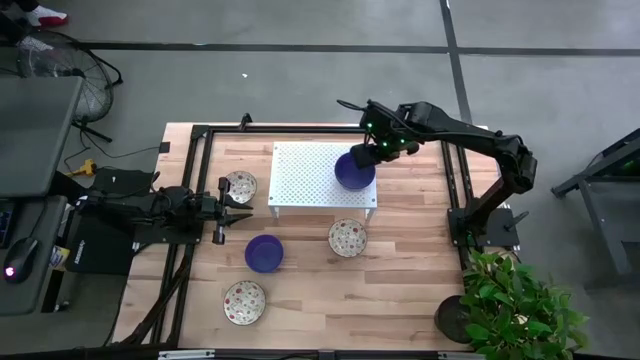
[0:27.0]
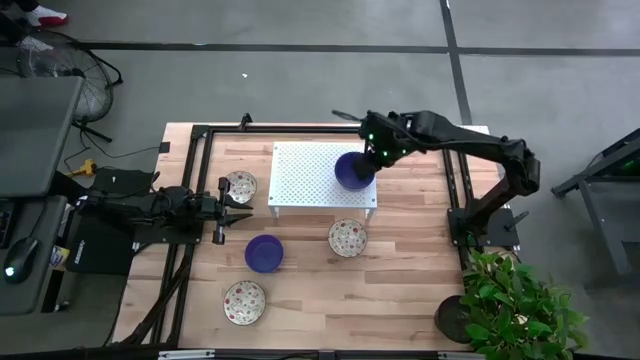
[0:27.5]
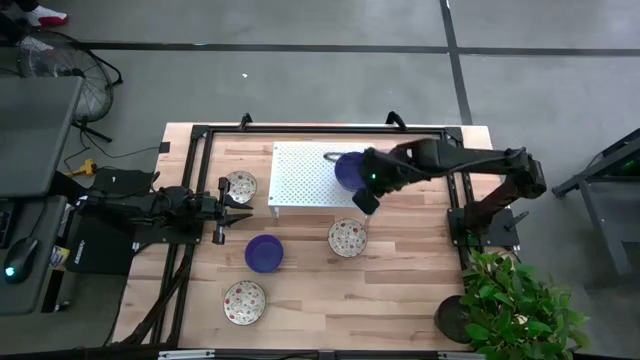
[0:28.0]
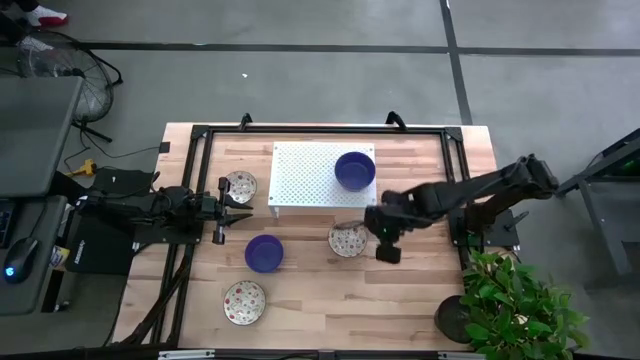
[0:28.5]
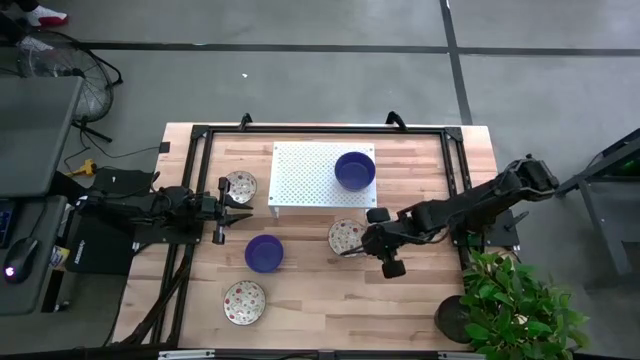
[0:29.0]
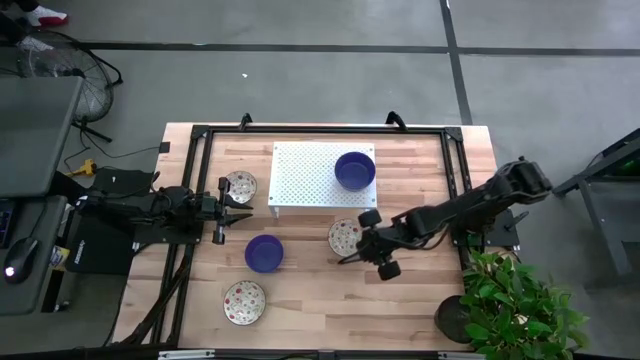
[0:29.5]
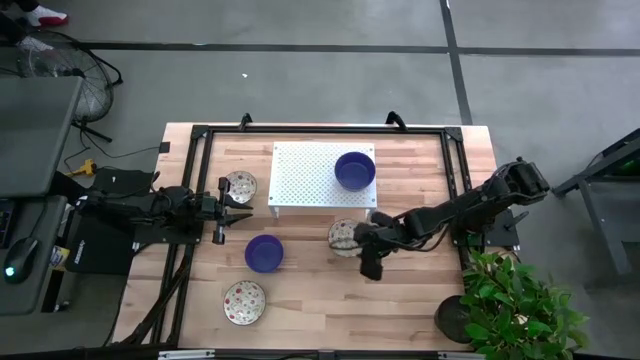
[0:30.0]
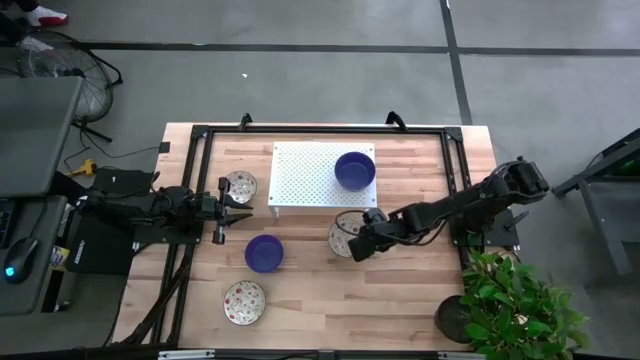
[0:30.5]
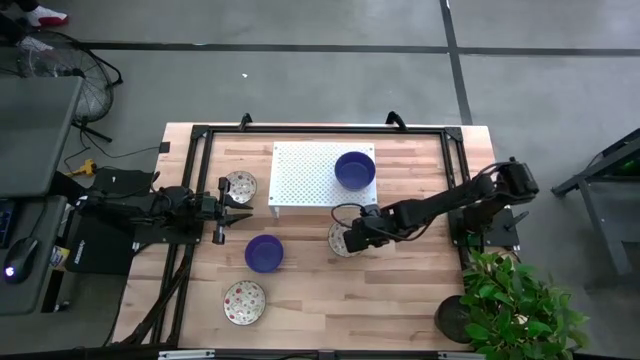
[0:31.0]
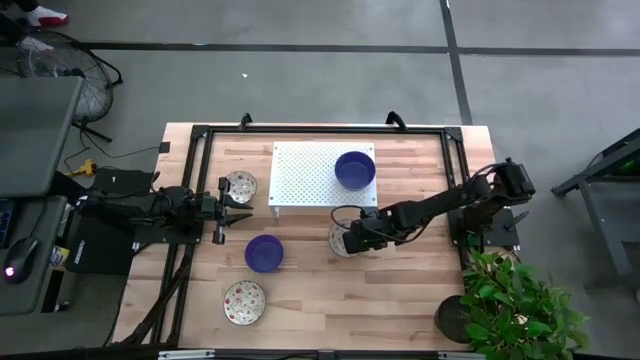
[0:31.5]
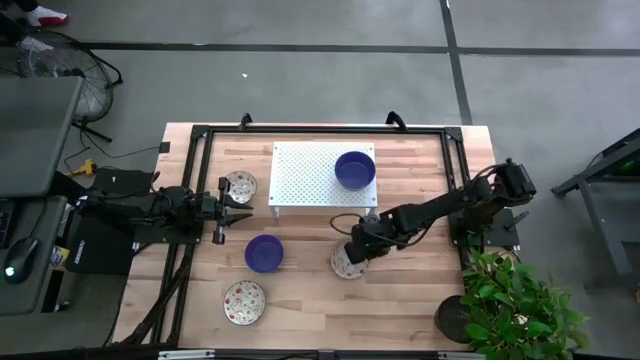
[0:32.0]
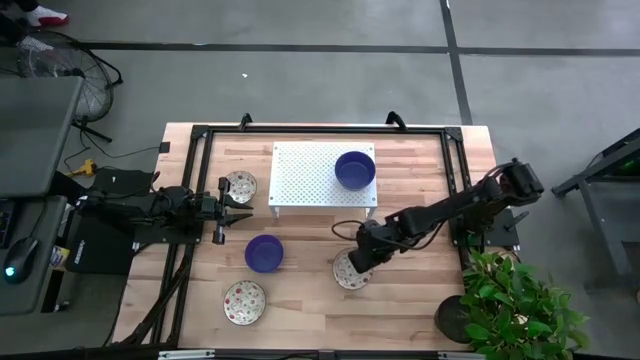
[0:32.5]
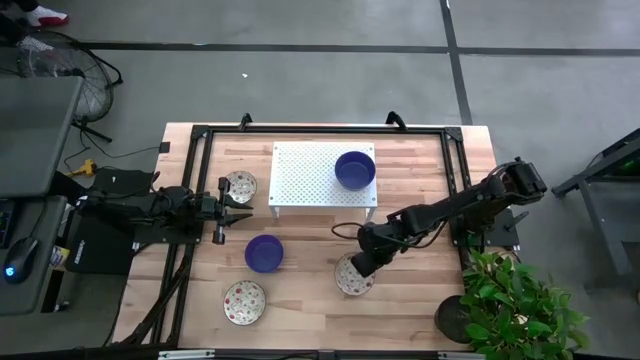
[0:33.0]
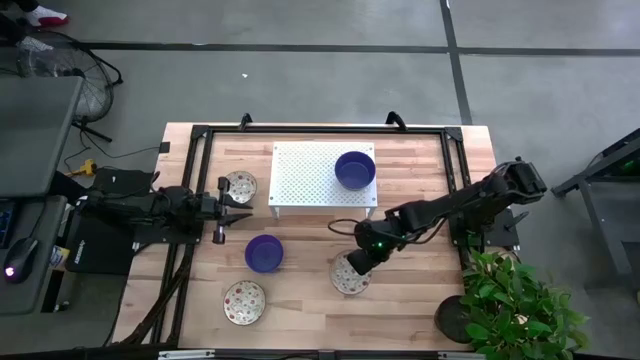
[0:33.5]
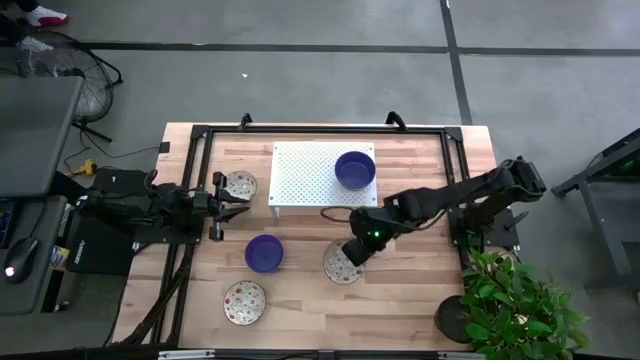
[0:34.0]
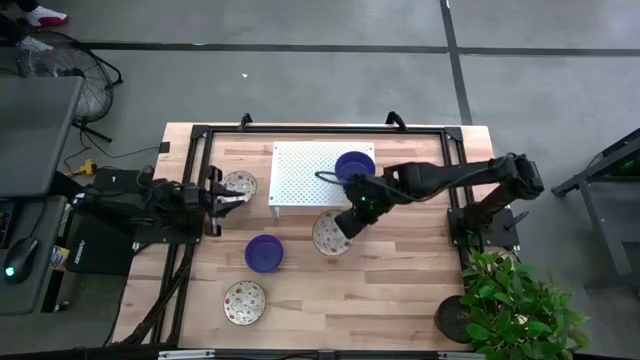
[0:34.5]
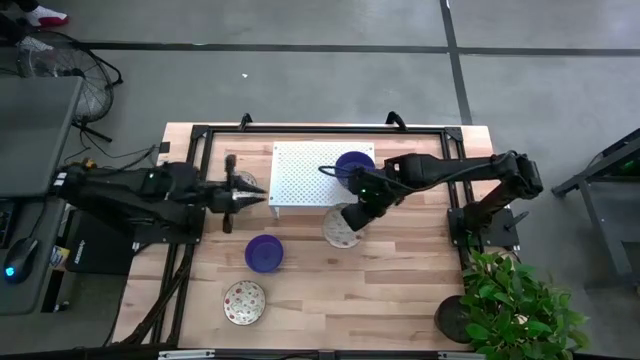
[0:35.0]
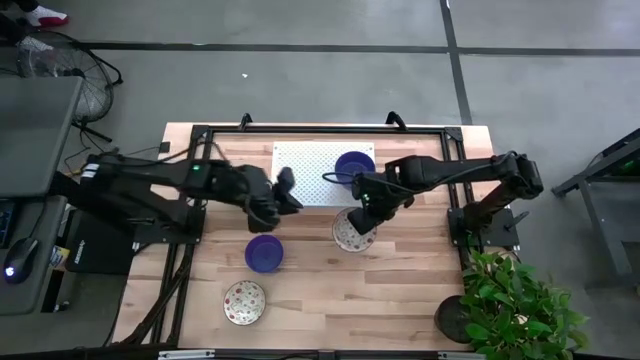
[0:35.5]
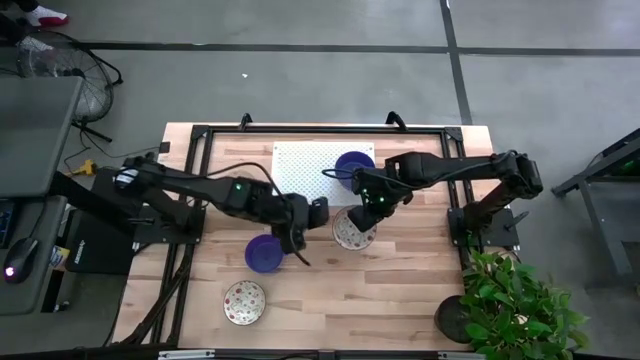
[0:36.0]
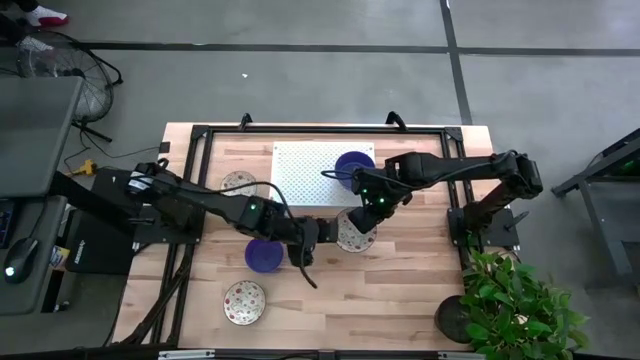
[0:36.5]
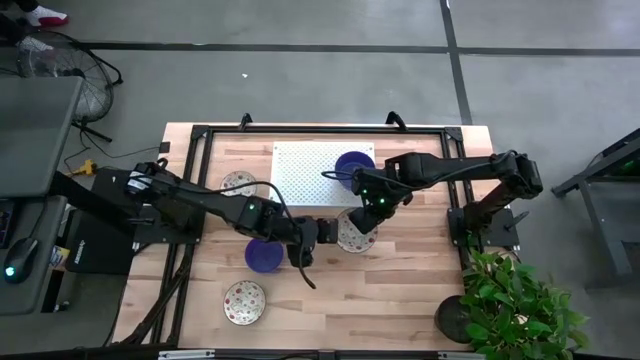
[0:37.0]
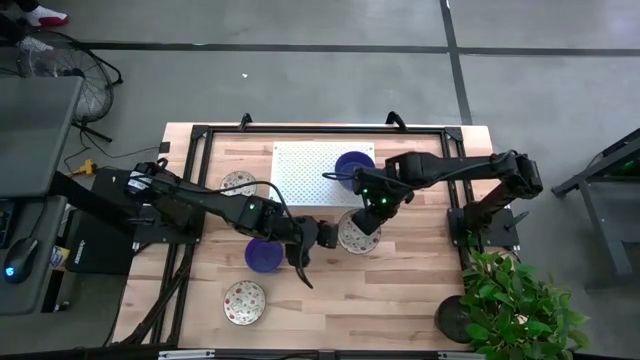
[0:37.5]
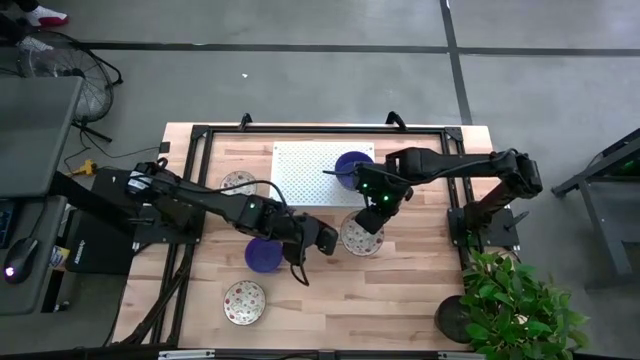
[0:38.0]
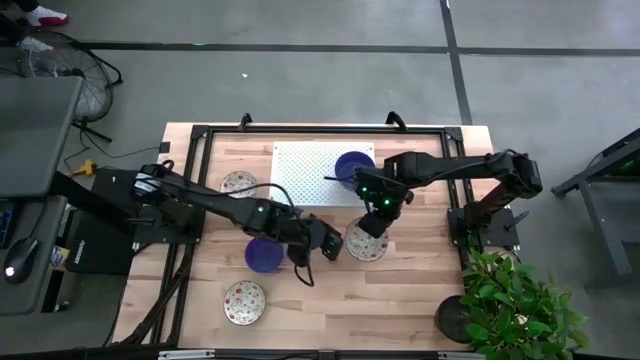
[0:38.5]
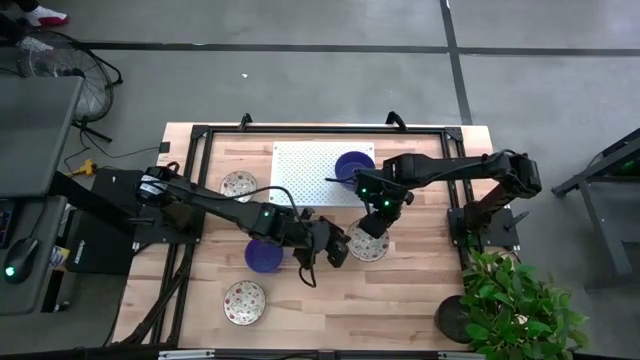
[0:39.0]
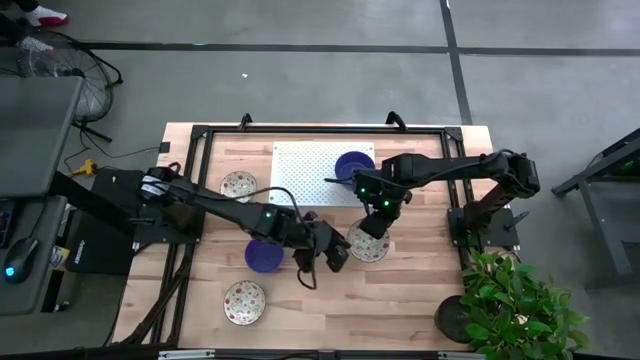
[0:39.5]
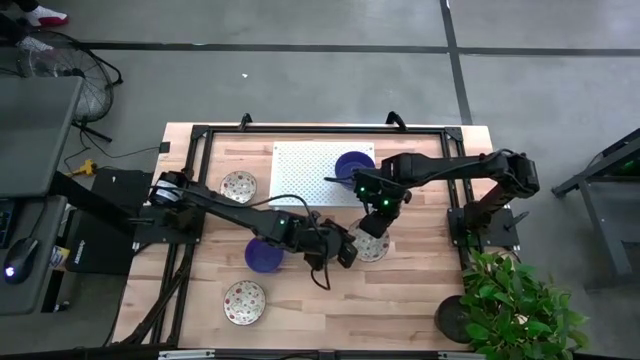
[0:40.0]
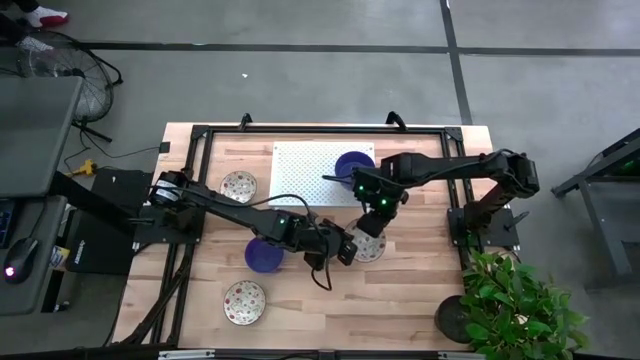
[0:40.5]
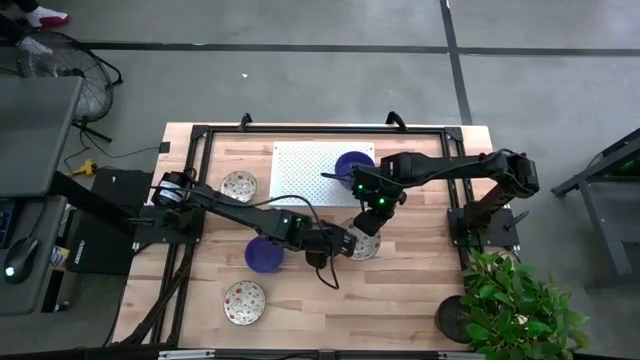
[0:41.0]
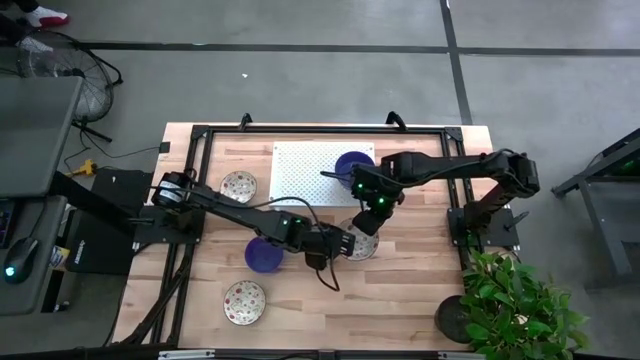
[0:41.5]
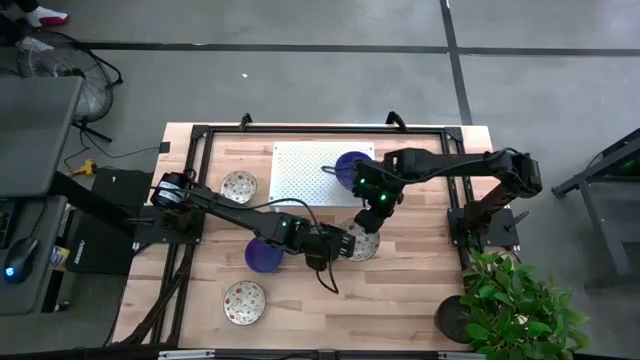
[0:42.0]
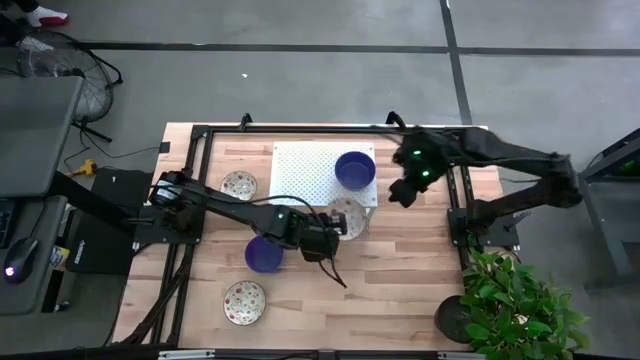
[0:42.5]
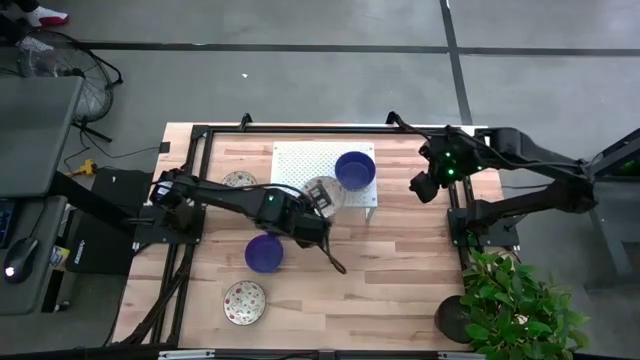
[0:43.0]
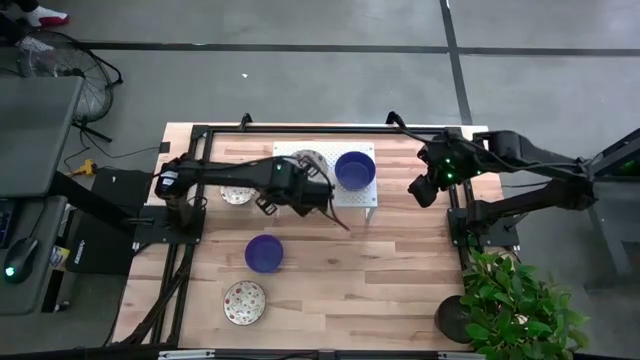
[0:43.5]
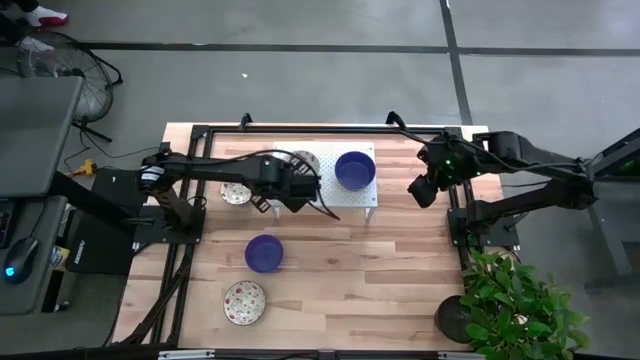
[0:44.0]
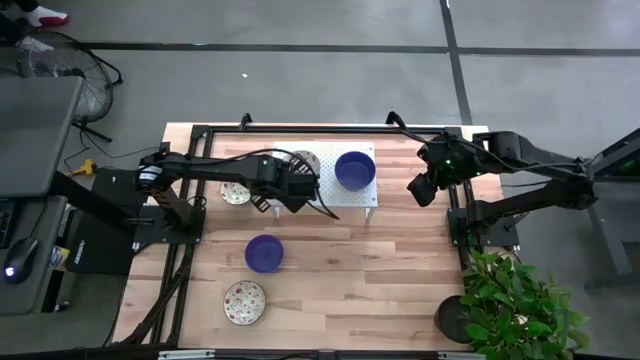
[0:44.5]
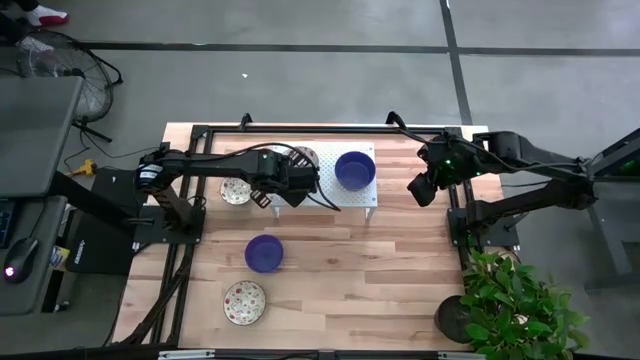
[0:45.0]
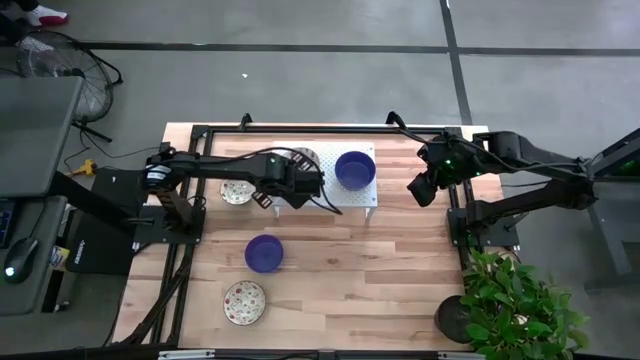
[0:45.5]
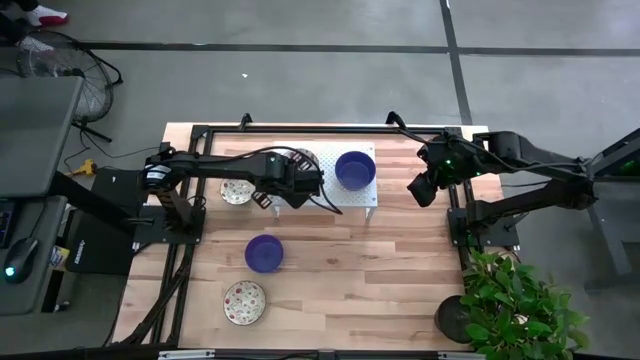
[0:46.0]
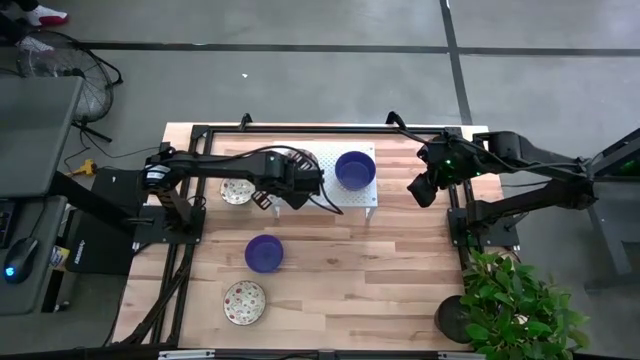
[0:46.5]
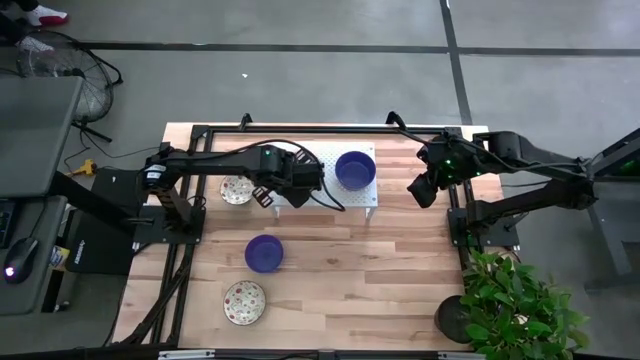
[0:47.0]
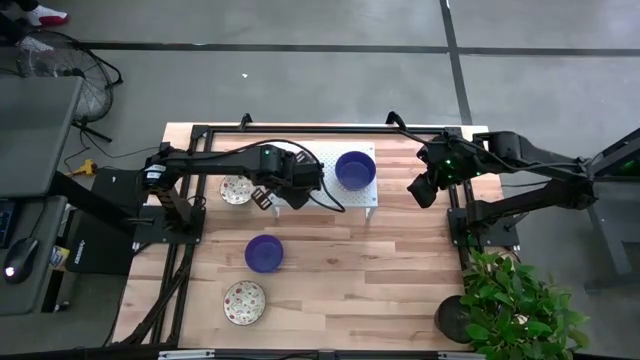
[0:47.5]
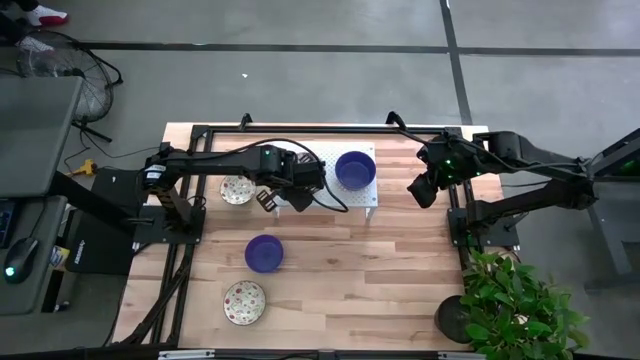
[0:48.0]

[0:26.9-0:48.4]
Task: Pick & Place Mini bowls
Put the right white patterned bowl on the shelf
